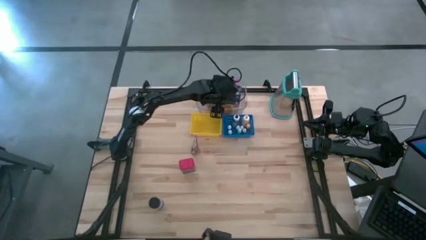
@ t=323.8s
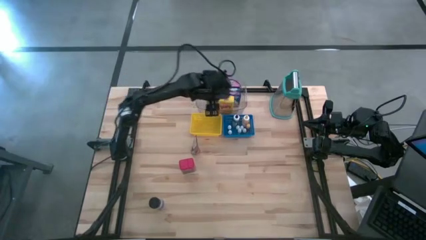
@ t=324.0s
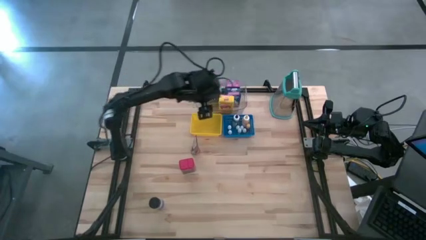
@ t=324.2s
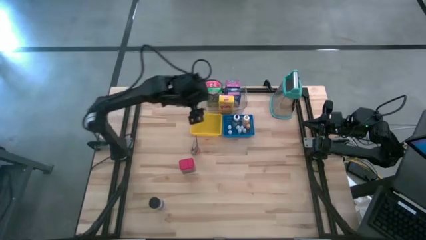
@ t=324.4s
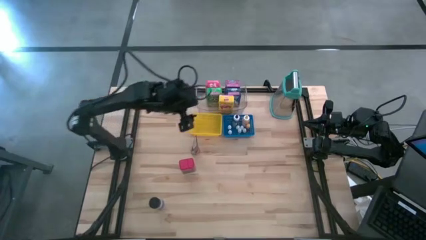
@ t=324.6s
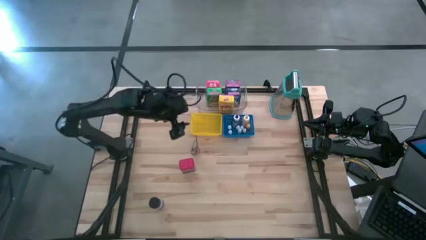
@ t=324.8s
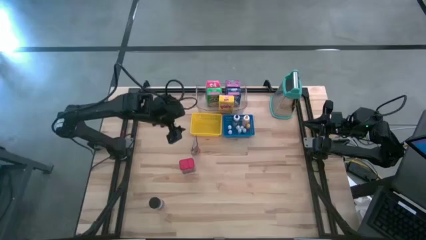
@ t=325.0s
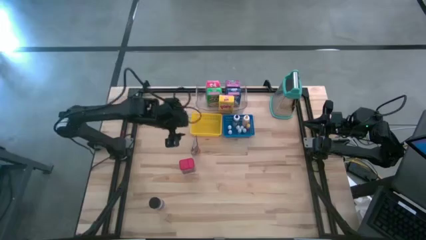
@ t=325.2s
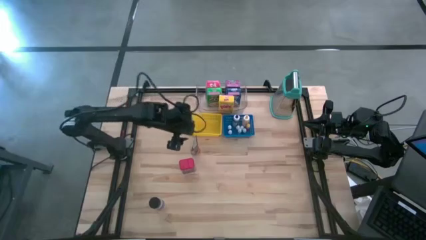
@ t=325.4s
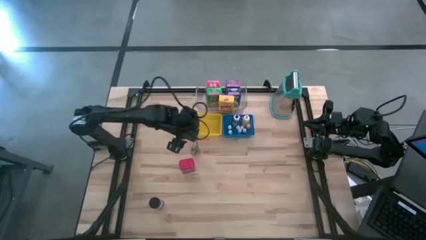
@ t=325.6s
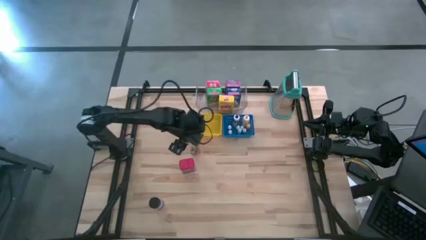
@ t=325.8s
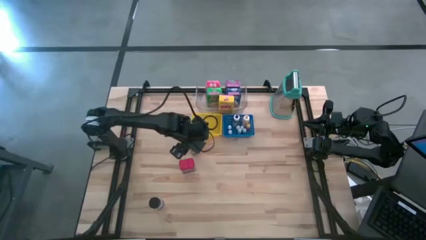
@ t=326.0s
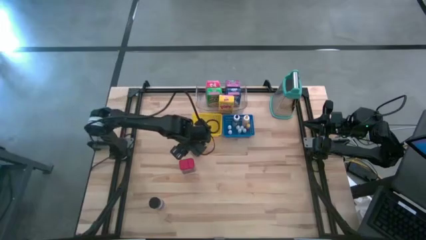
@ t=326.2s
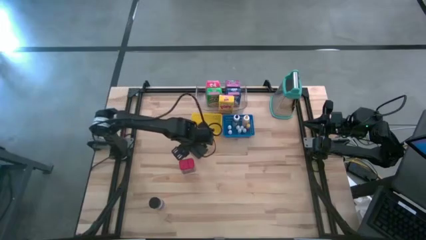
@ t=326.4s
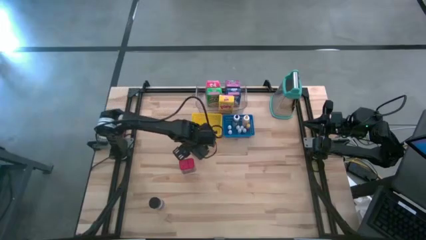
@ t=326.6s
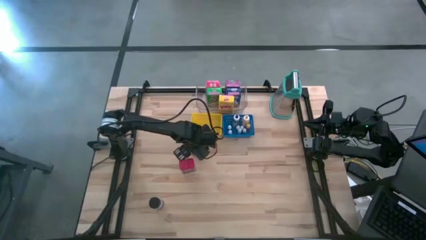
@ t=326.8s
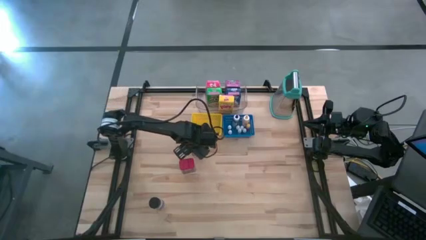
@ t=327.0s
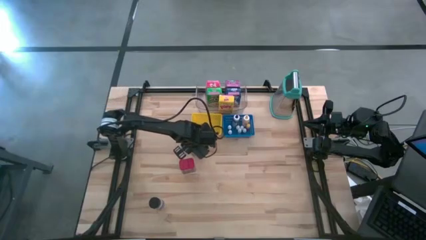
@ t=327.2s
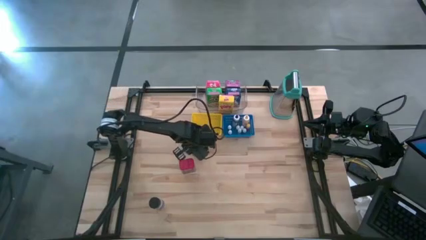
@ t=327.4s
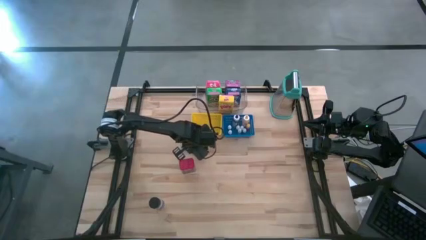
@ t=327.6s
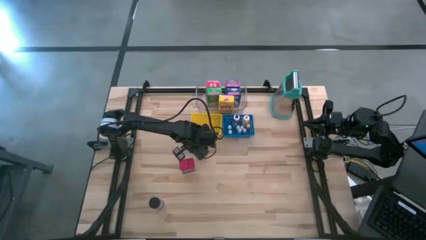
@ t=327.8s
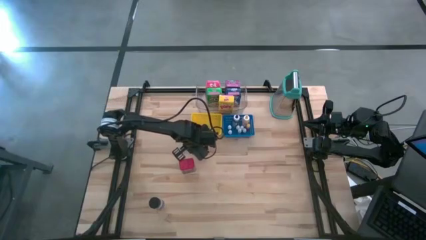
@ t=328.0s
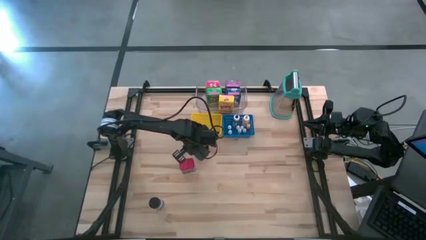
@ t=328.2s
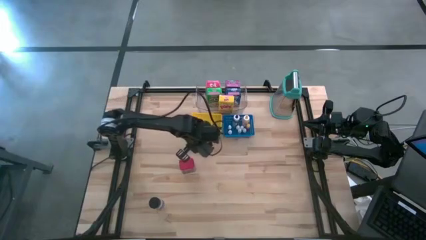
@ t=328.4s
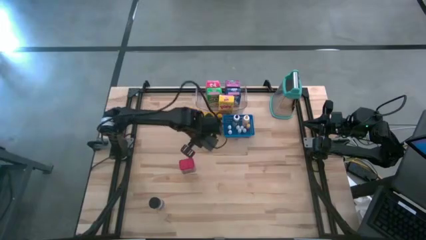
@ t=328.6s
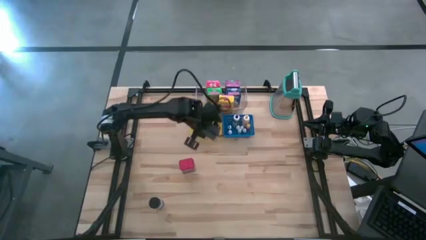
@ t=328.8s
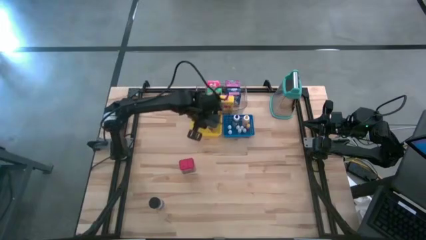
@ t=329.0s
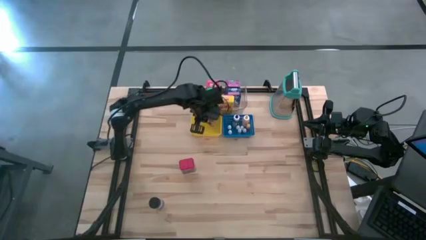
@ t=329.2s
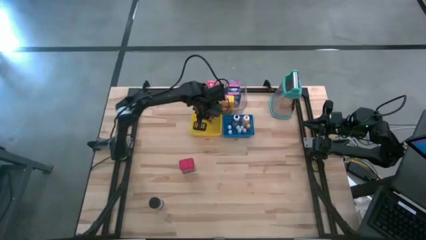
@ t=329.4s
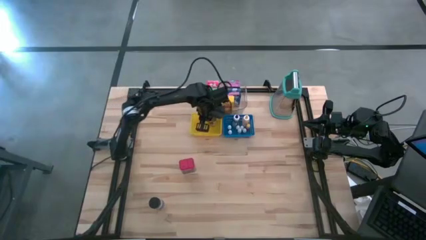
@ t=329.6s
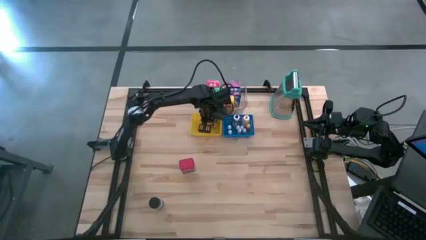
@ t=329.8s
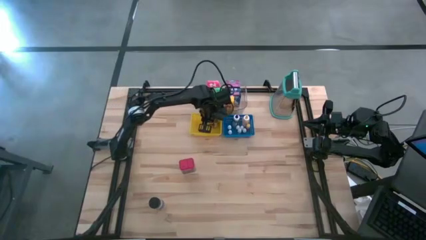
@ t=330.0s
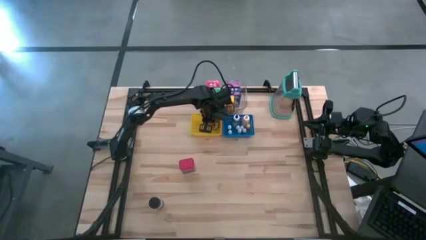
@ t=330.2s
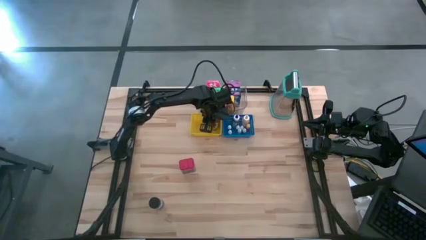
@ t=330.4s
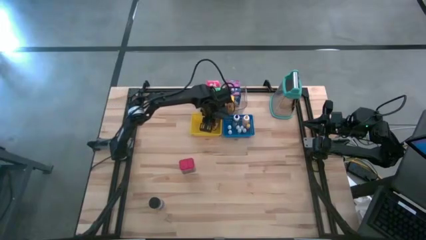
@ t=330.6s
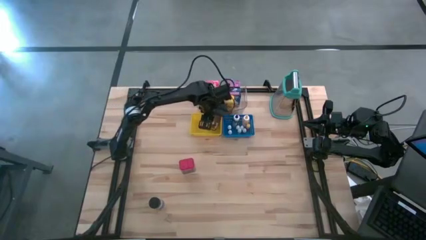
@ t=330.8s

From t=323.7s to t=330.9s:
Task: Pick & Place Kitchen Items
Put the orange seasoning pack into the yellow bin

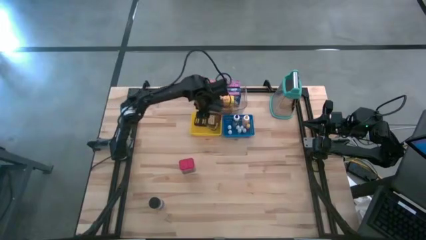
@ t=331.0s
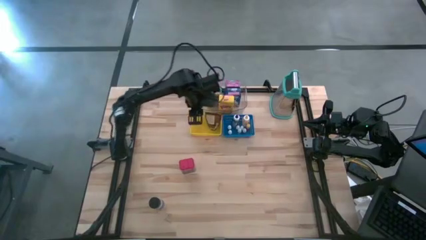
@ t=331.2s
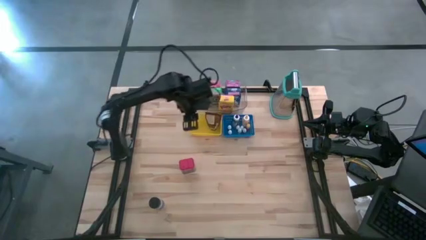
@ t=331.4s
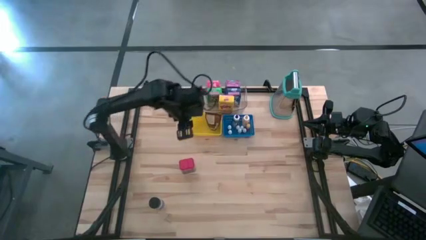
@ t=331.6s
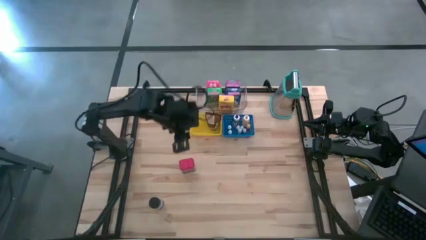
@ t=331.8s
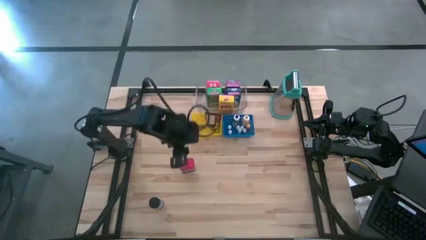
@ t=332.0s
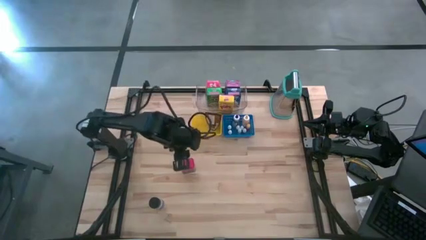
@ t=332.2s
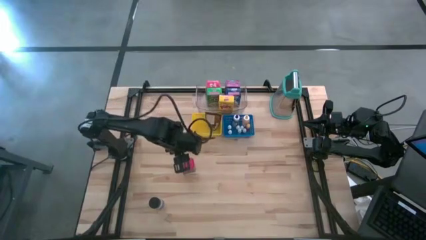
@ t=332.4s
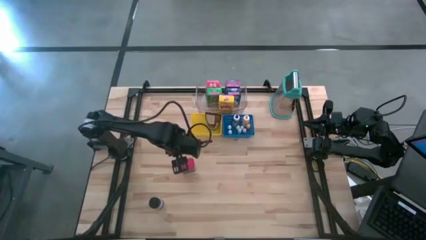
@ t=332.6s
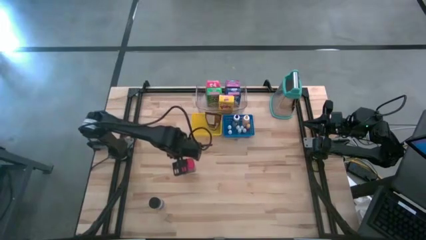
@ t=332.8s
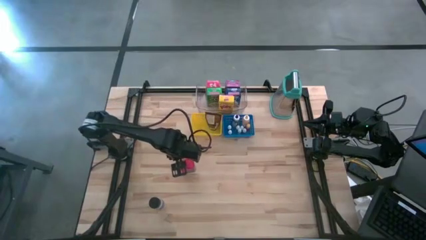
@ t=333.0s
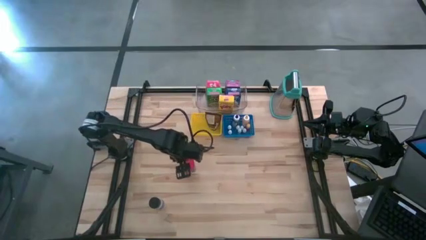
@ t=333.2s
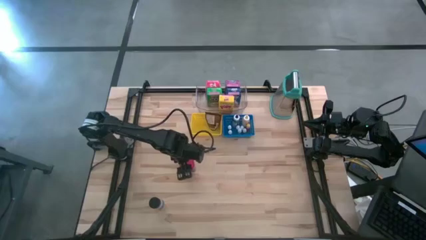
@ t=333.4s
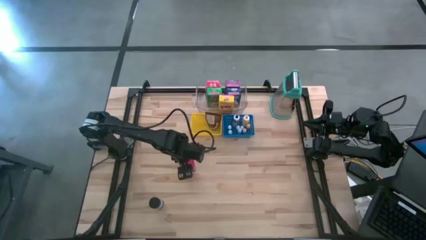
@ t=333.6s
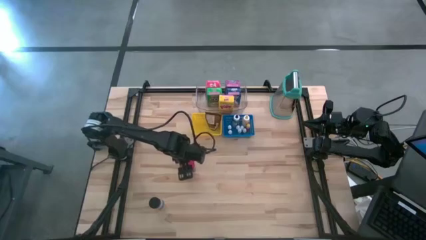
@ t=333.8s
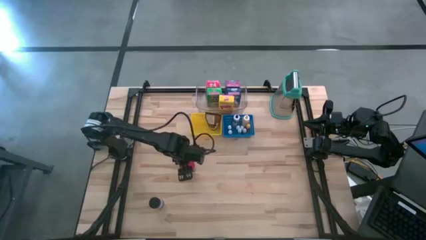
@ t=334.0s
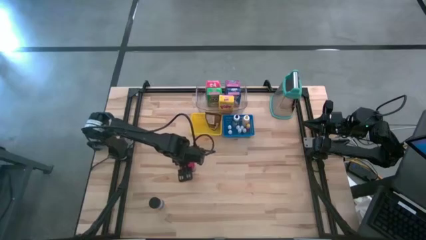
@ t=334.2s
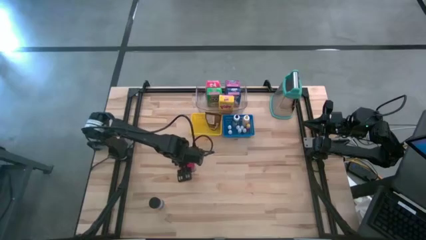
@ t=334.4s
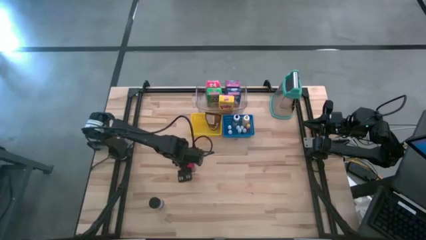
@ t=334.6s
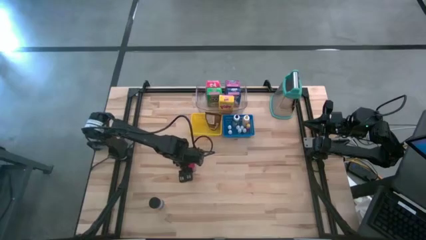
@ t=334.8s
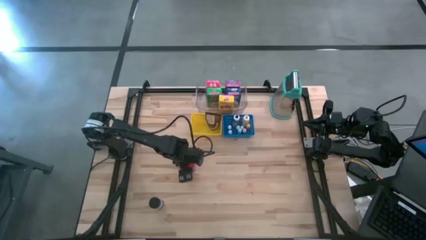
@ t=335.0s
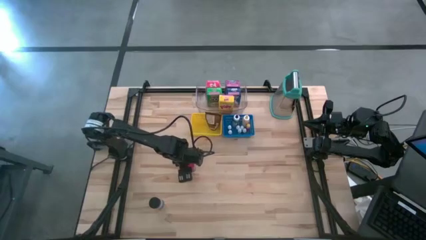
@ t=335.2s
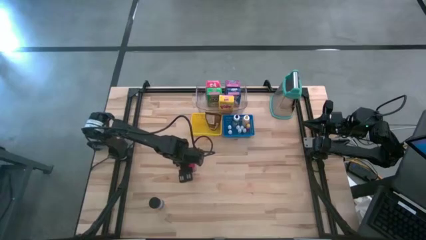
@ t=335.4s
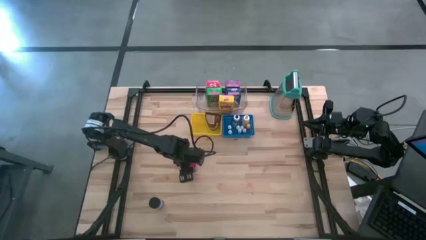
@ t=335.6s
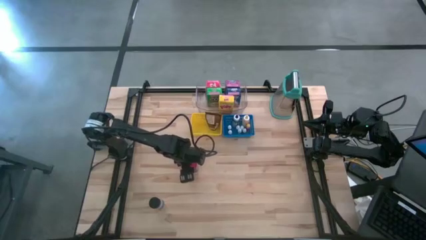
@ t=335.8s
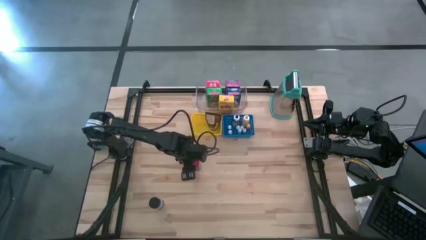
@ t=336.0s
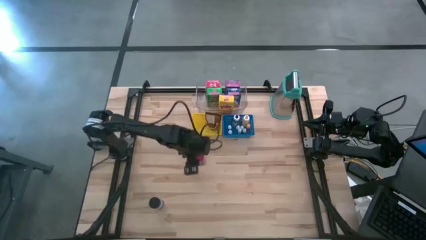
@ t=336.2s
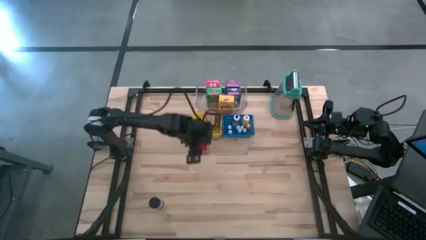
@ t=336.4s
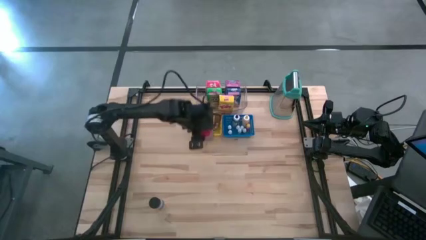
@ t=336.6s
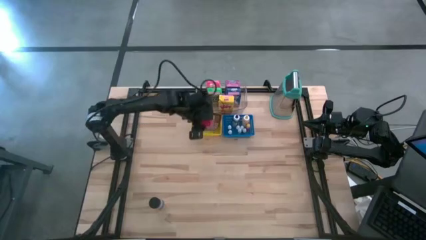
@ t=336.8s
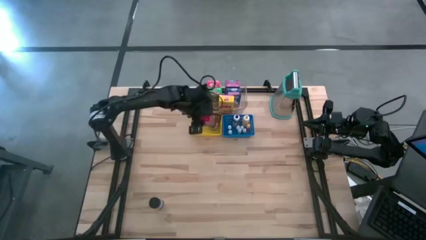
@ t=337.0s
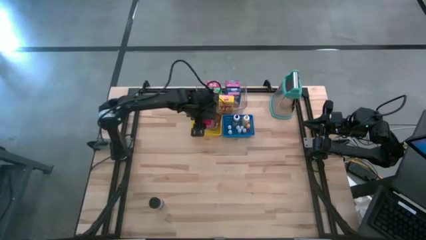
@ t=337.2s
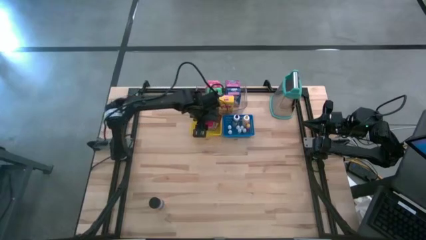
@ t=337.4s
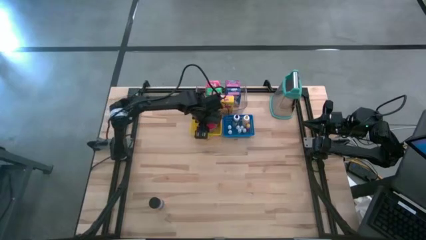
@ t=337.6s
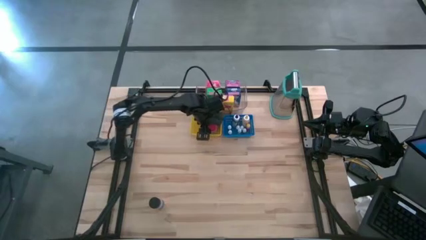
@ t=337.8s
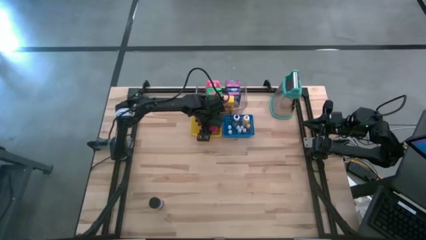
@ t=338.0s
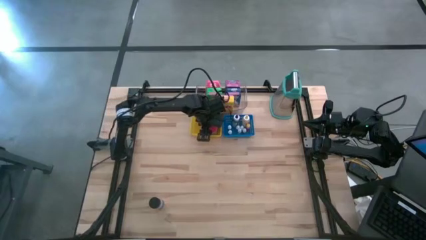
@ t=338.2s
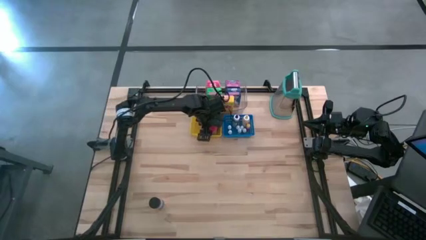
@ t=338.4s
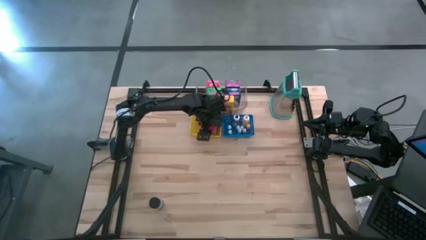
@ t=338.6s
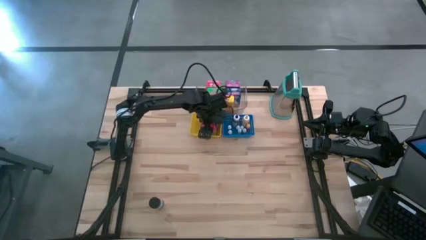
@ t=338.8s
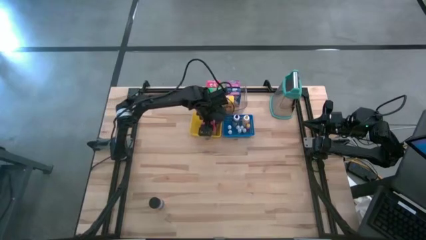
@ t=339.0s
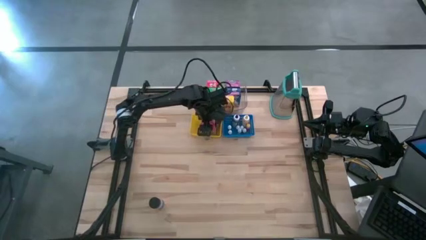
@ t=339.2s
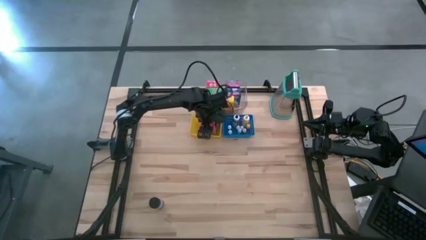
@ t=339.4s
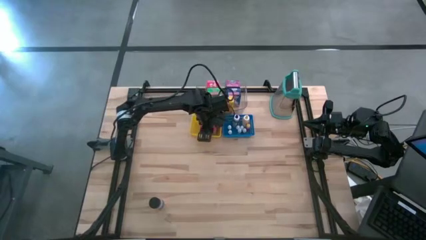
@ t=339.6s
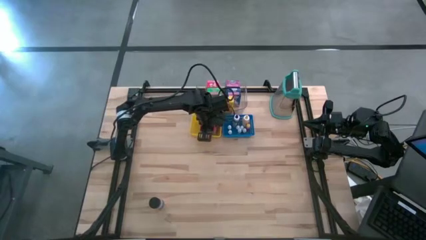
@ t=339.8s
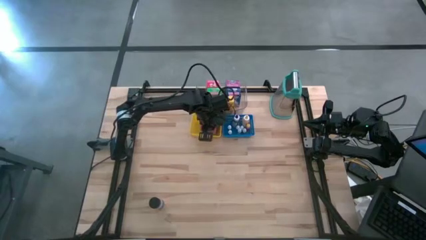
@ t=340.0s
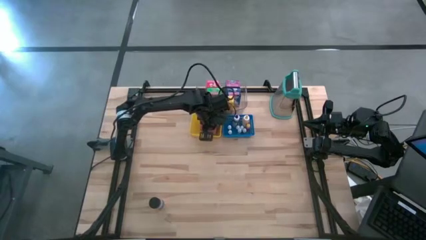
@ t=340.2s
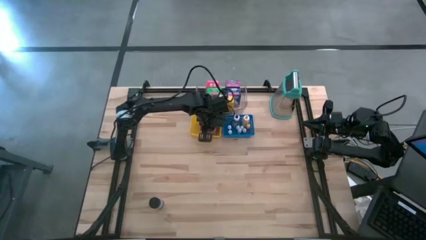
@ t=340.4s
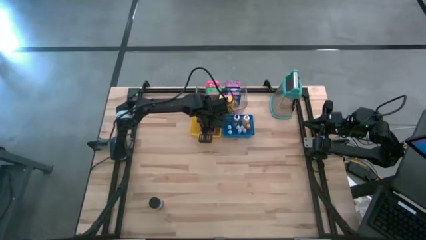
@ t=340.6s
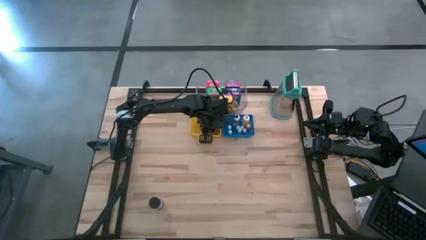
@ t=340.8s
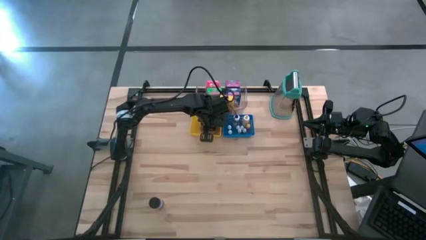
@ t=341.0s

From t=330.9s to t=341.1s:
Put the red seasoning can into the yellow bin
